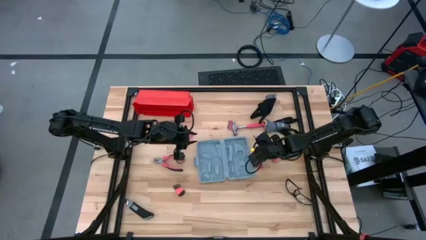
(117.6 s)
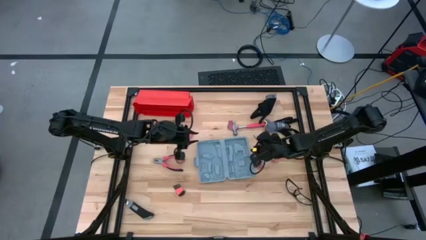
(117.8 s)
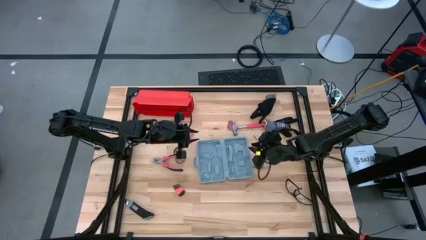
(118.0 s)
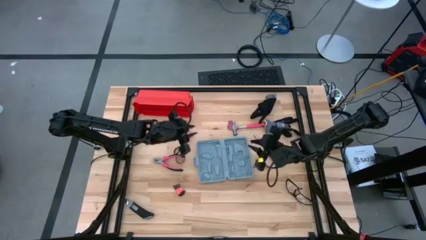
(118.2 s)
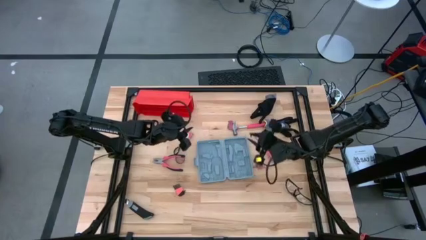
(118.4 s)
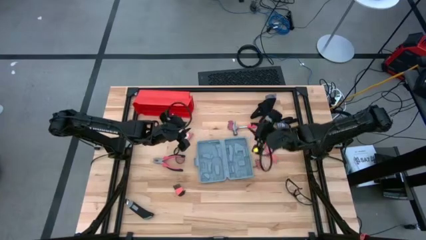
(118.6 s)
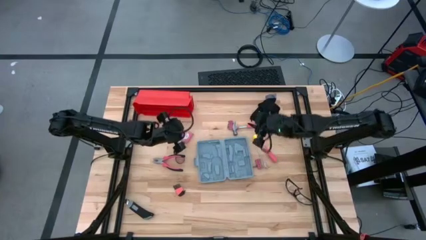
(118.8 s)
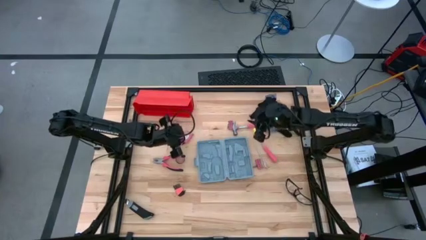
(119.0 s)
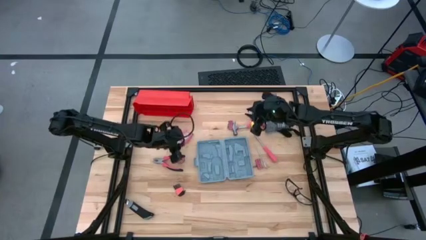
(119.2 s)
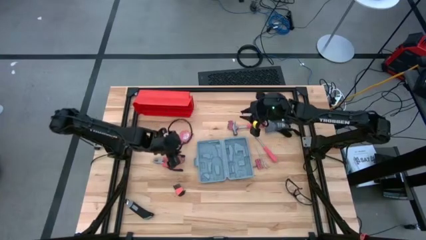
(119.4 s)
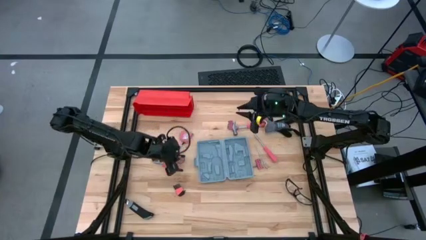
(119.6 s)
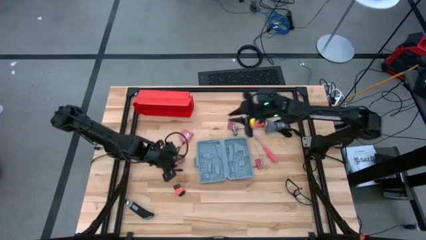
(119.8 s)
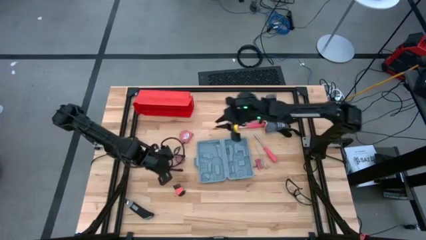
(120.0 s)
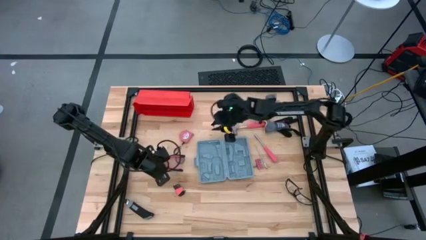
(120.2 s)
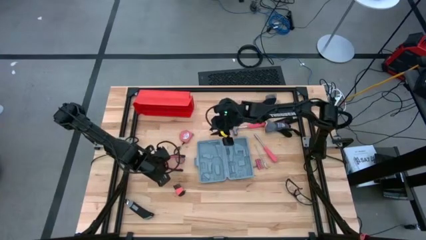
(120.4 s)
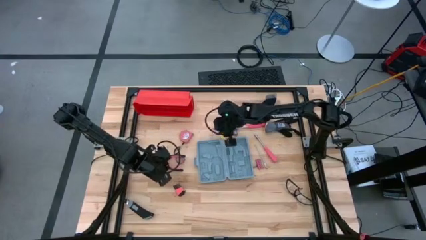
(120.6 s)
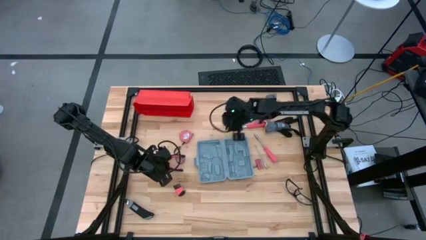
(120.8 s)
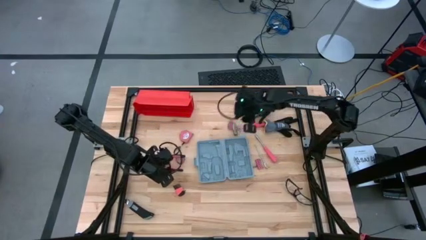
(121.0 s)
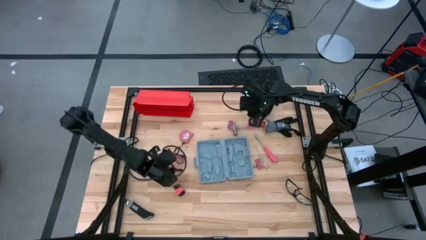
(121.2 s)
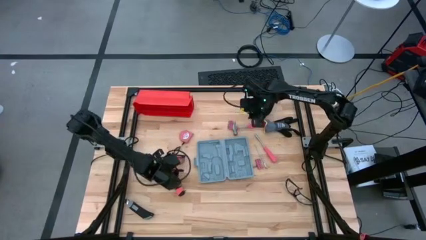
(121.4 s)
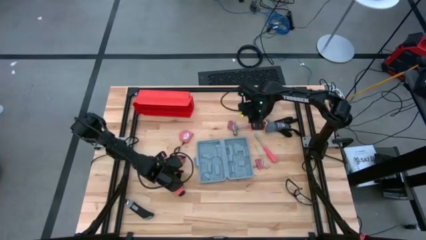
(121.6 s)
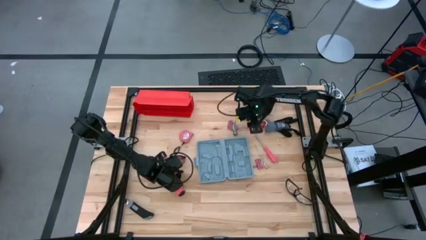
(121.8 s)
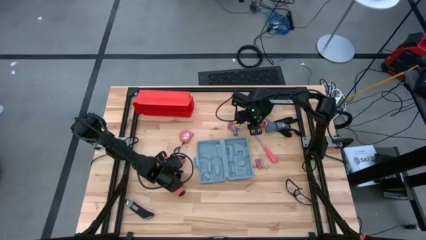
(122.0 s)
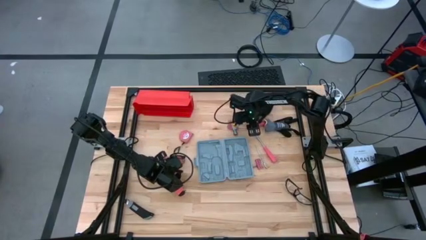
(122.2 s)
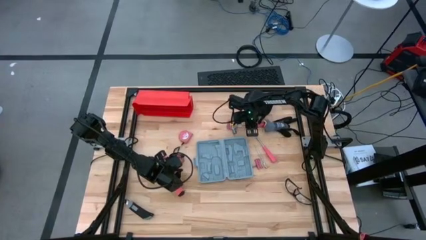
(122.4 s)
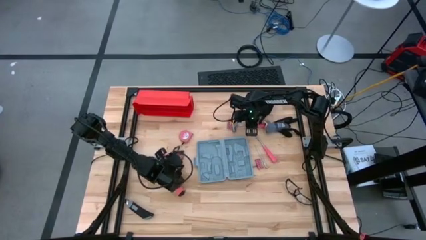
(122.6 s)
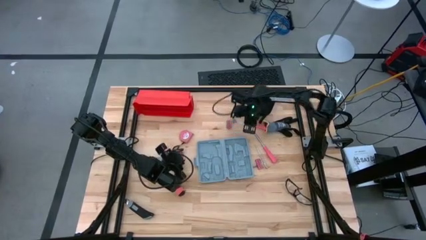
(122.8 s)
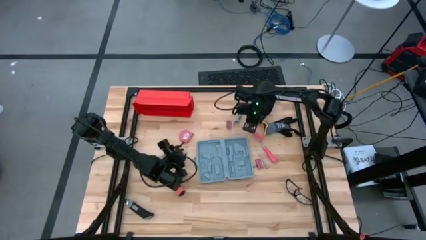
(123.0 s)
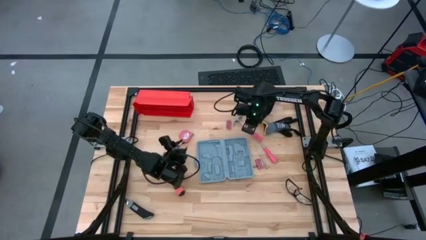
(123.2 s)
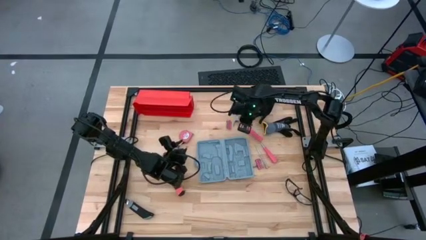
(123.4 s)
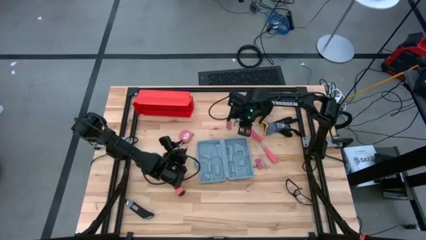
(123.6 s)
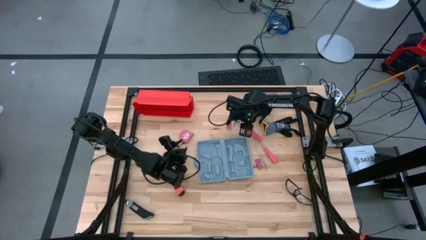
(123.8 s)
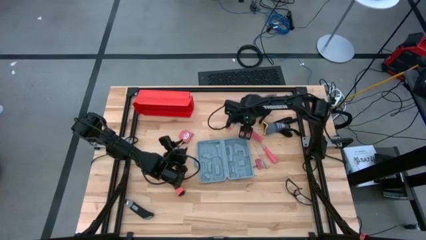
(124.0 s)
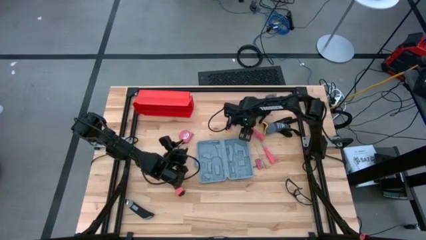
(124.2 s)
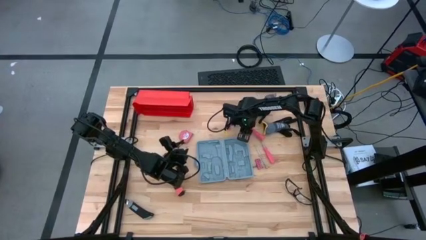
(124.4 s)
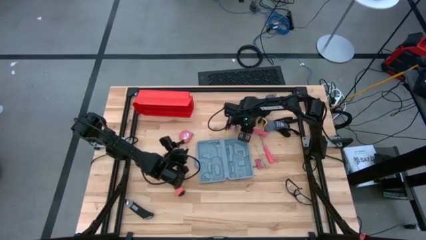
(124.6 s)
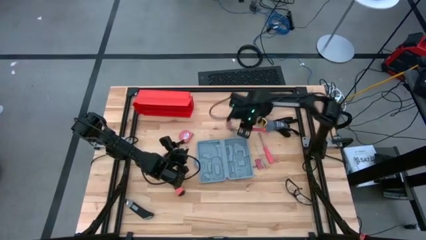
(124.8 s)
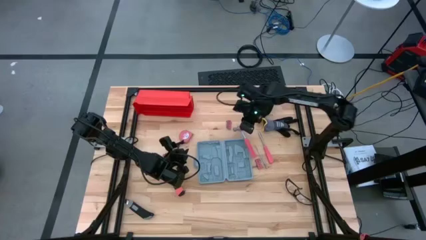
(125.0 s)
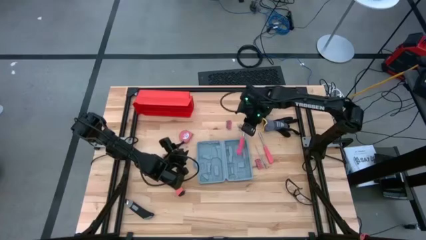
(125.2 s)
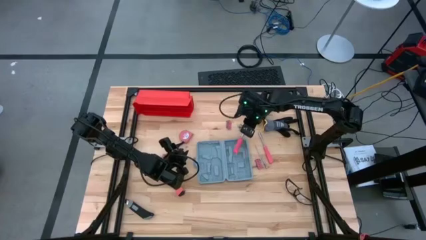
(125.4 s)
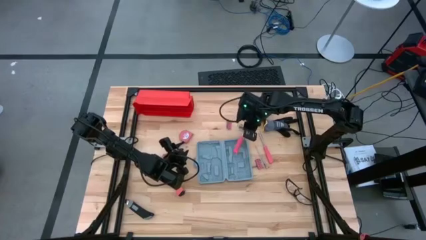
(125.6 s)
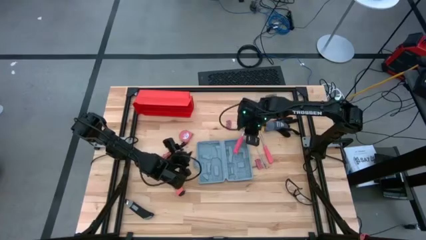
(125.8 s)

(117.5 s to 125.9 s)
Task: prefit tool cases
Put the orange hammer into the gray pre-fit tool case

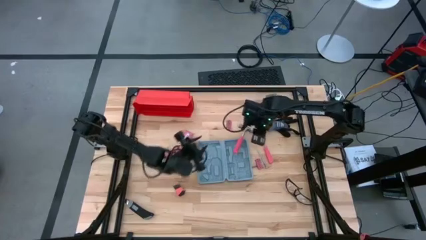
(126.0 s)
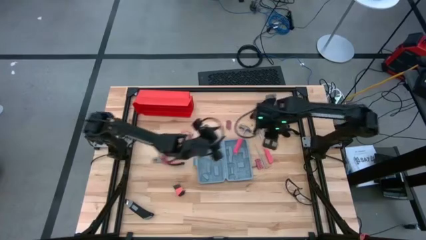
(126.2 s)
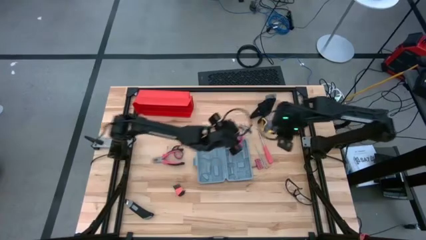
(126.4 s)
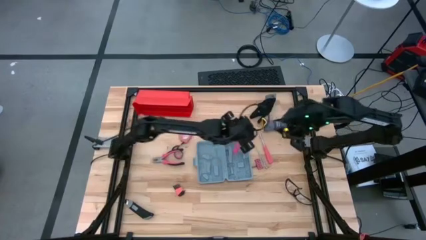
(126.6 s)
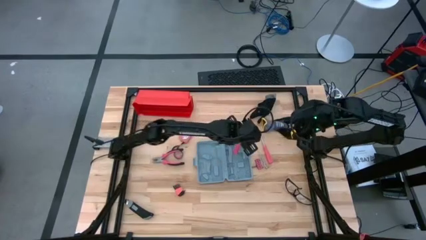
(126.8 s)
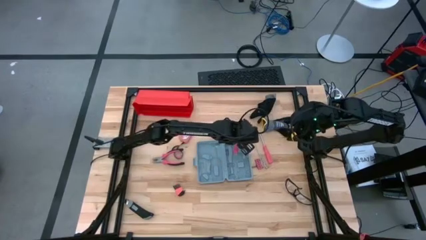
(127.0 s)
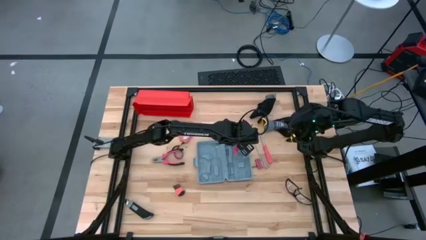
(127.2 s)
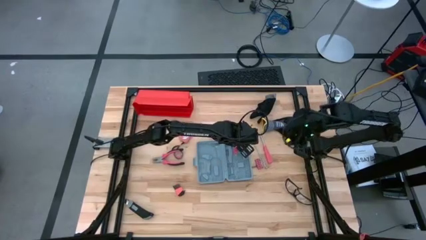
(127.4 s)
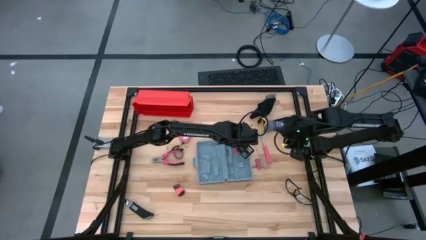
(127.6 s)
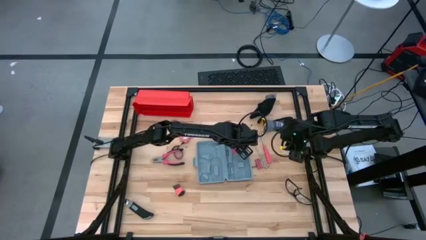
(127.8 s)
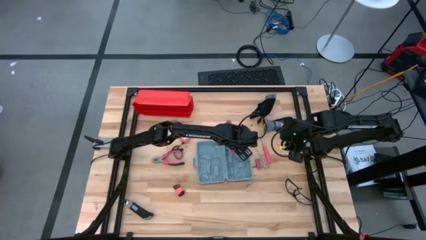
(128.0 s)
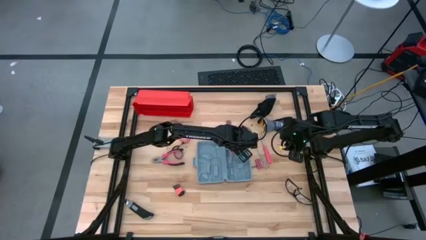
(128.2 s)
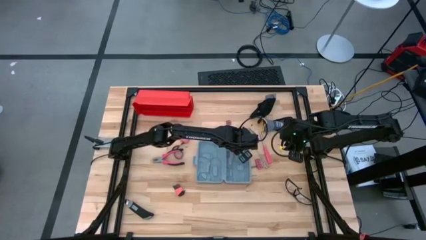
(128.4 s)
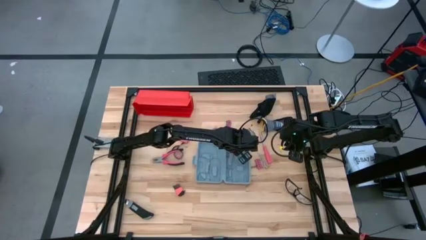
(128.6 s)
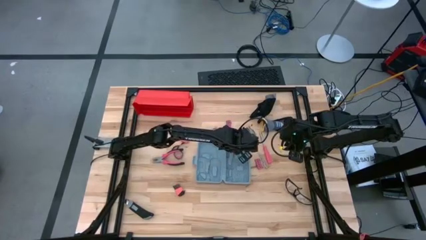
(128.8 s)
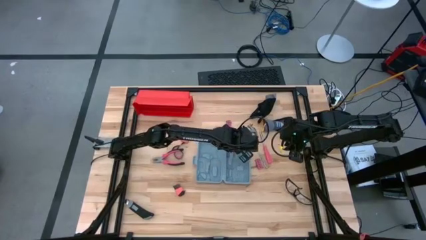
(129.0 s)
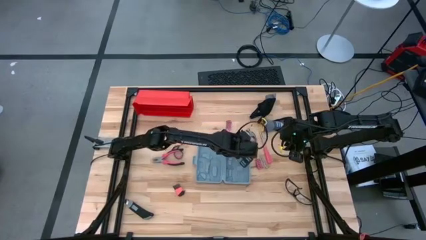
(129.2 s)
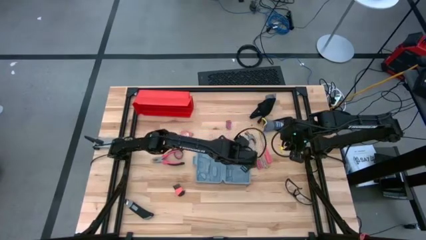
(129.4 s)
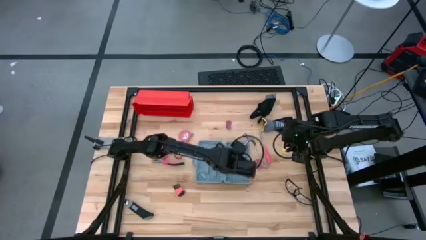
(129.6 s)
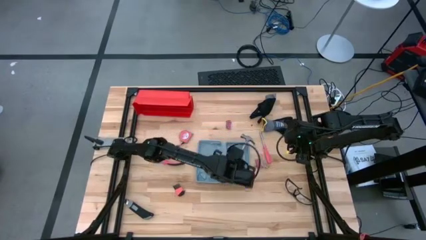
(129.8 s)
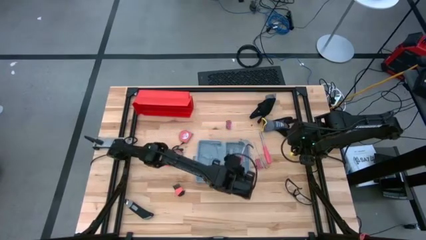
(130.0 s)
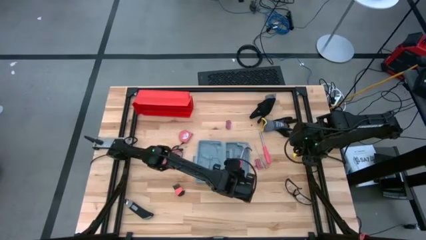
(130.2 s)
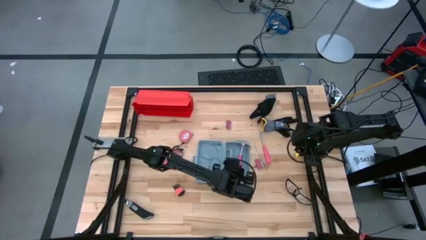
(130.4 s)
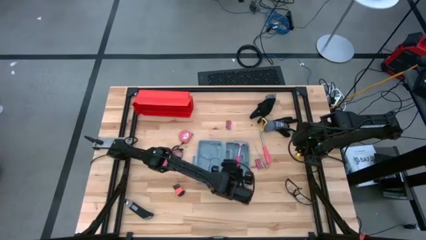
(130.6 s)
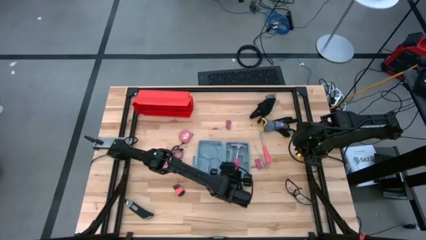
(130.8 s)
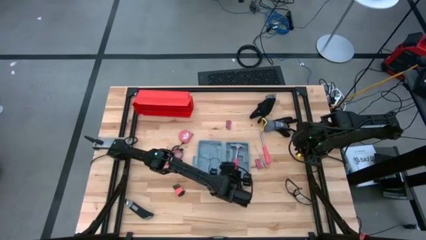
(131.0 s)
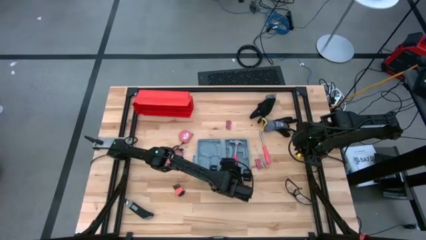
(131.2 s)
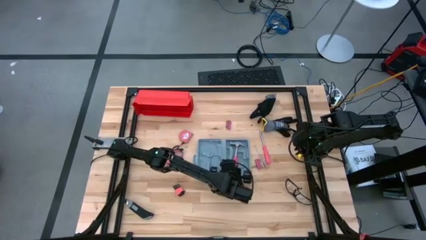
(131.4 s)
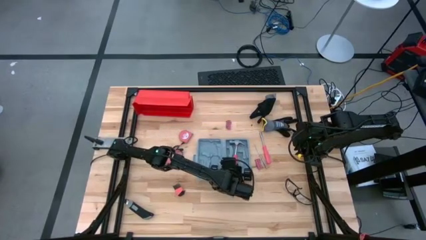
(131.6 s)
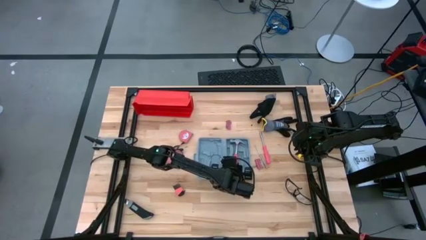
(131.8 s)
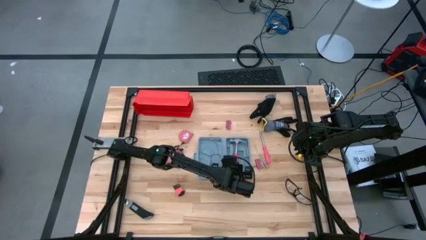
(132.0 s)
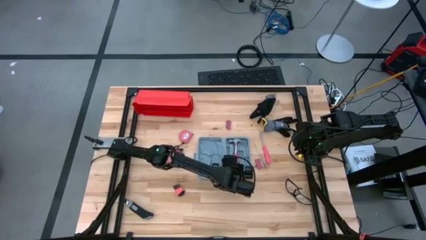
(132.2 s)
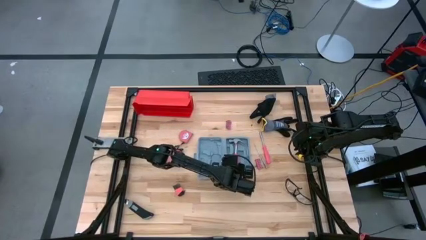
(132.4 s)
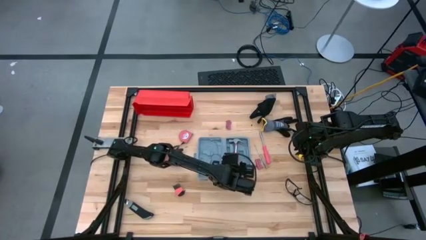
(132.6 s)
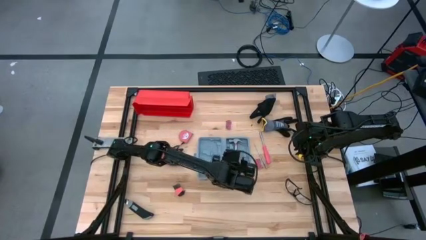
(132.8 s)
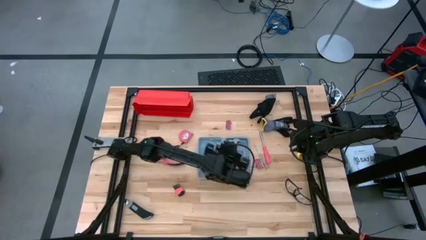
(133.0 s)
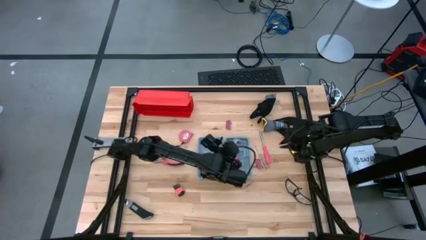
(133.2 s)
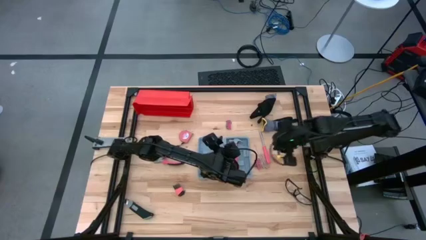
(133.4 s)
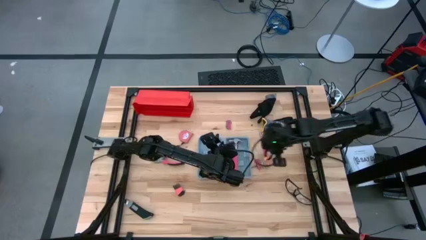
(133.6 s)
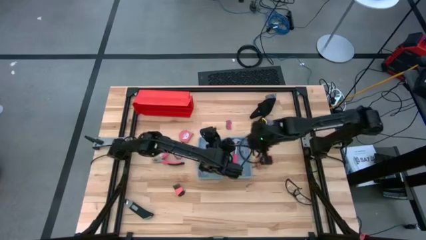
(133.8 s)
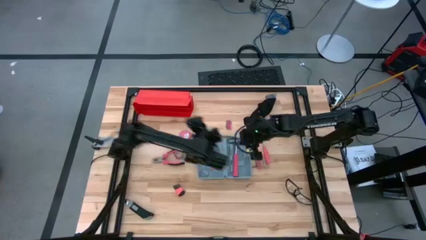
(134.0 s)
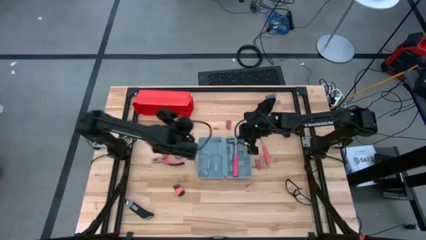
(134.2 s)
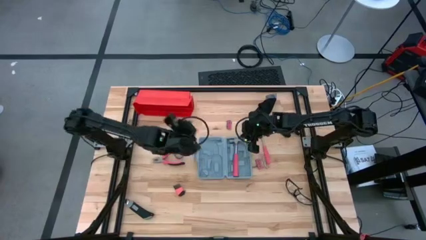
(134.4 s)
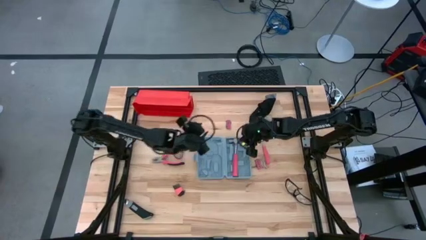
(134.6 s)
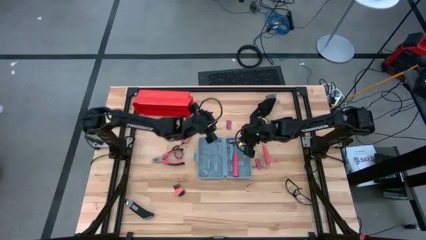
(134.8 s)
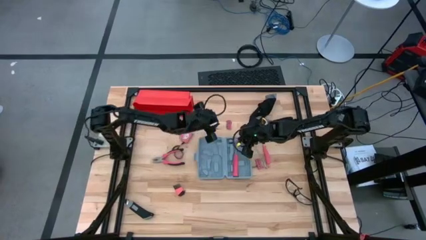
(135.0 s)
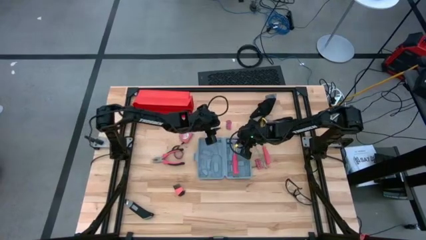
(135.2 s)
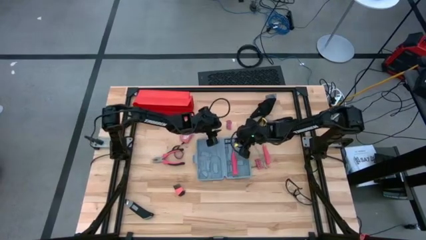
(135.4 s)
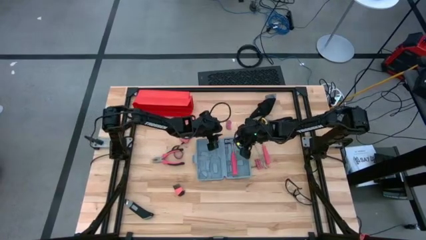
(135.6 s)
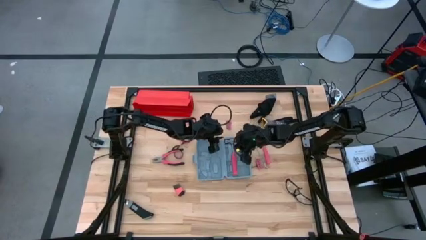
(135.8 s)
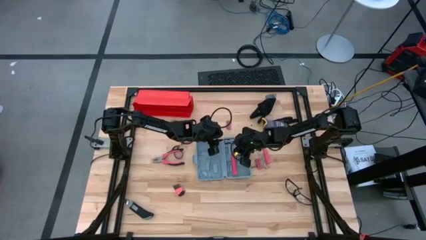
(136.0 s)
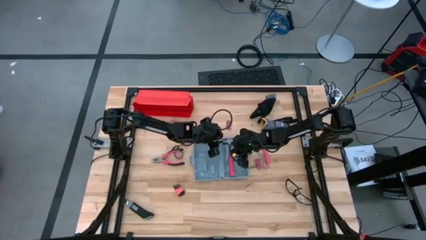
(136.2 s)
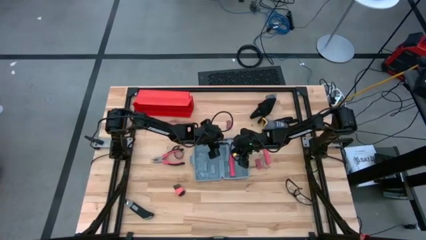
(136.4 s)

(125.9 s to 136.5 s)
Put the orange hammer into the gray pre-fit tool case
